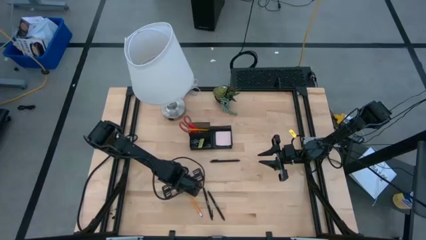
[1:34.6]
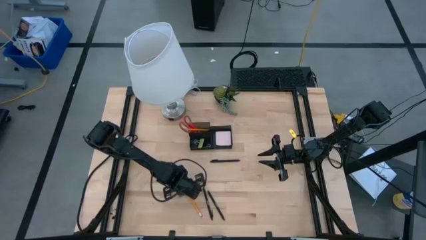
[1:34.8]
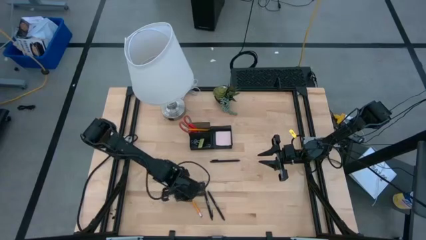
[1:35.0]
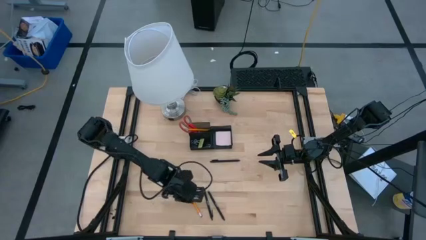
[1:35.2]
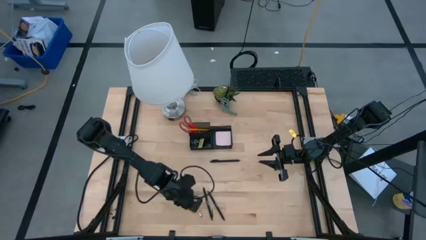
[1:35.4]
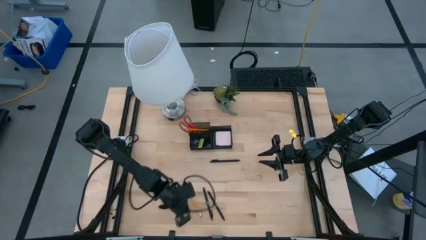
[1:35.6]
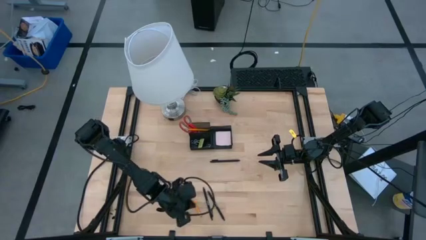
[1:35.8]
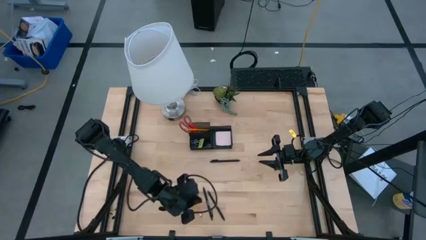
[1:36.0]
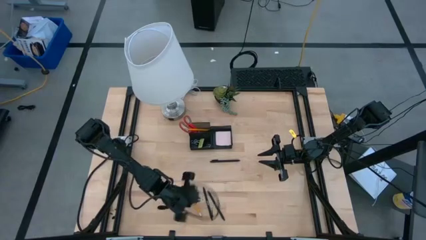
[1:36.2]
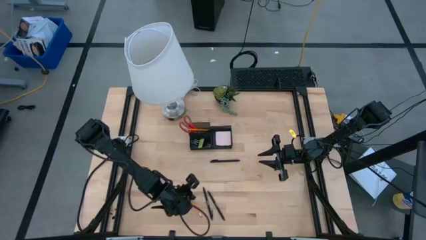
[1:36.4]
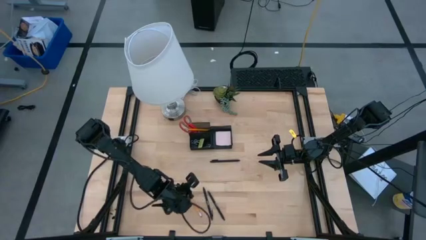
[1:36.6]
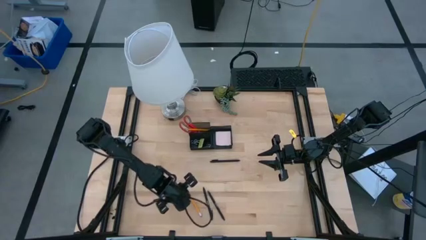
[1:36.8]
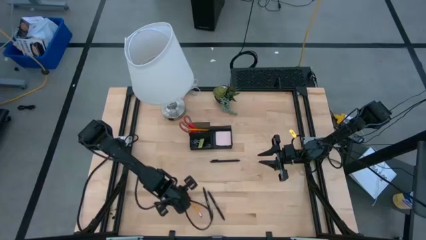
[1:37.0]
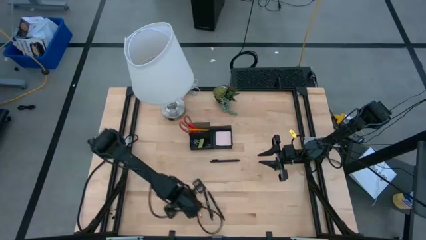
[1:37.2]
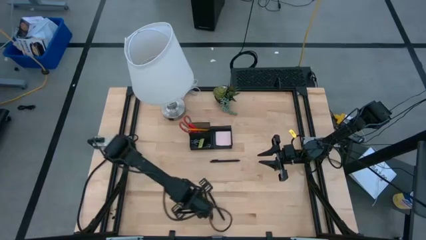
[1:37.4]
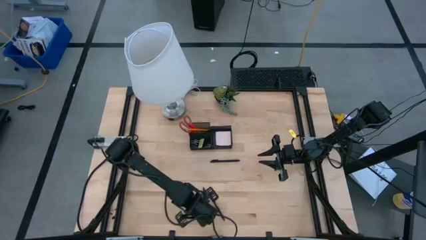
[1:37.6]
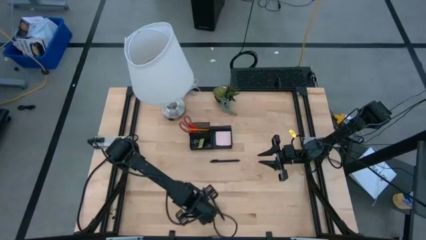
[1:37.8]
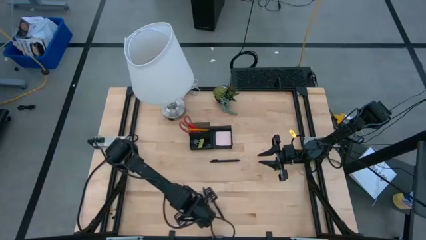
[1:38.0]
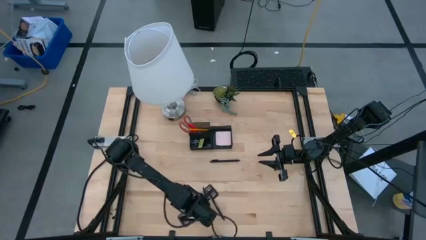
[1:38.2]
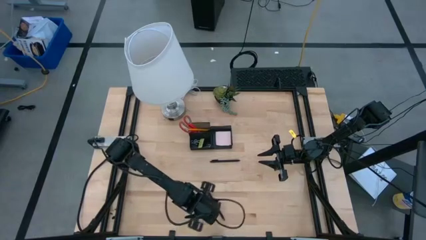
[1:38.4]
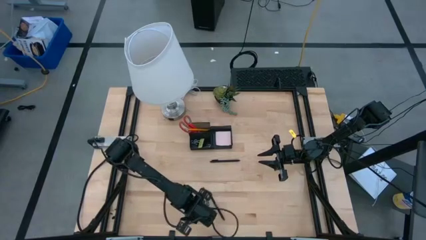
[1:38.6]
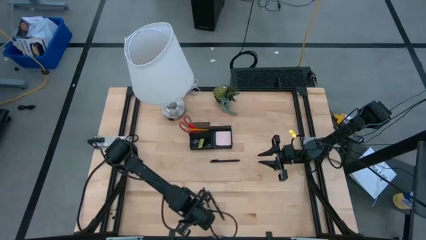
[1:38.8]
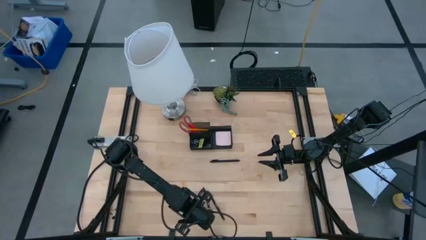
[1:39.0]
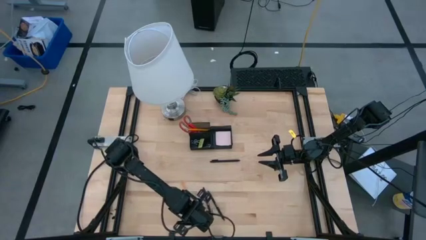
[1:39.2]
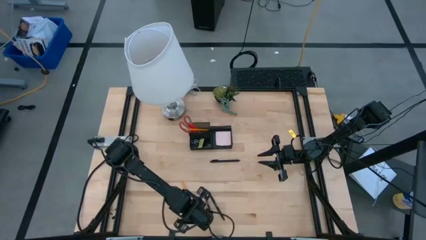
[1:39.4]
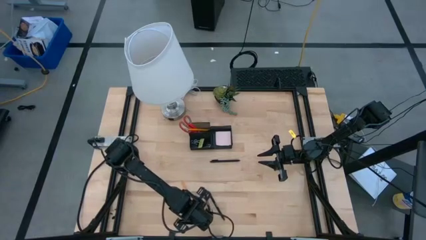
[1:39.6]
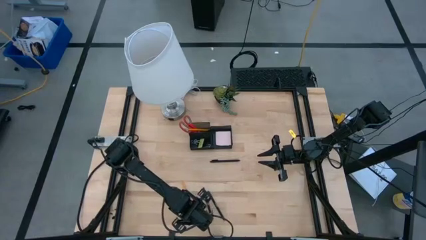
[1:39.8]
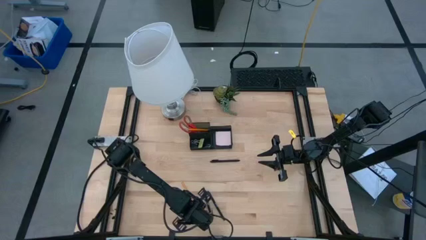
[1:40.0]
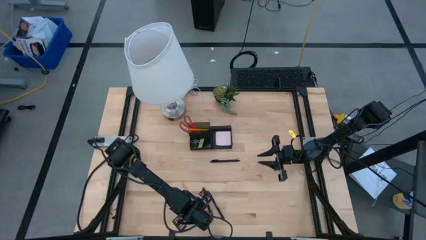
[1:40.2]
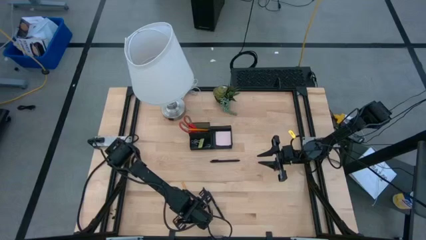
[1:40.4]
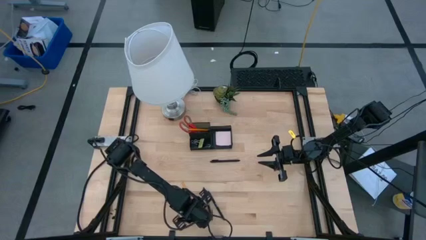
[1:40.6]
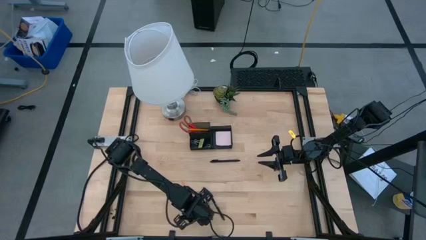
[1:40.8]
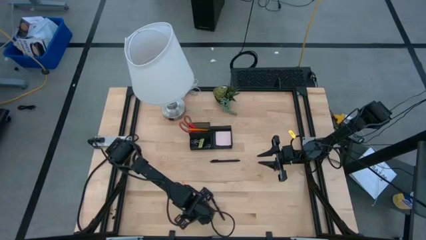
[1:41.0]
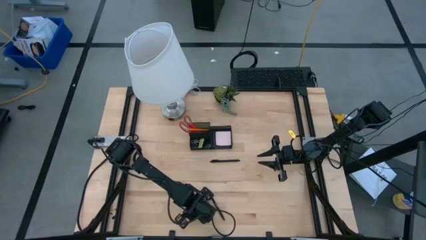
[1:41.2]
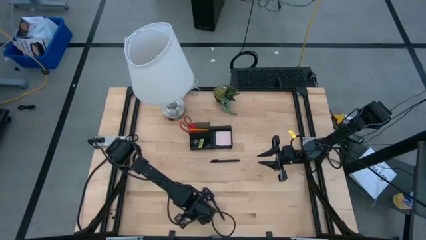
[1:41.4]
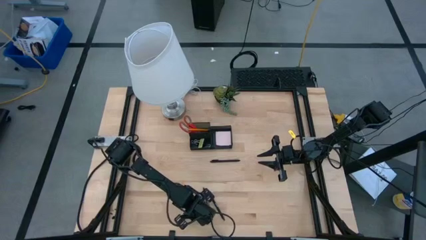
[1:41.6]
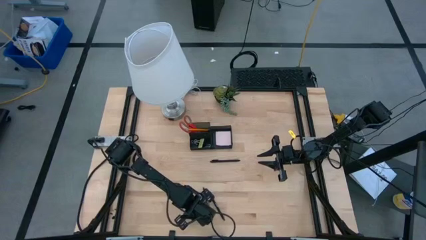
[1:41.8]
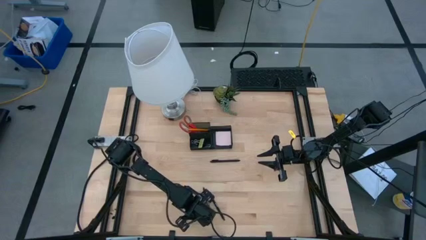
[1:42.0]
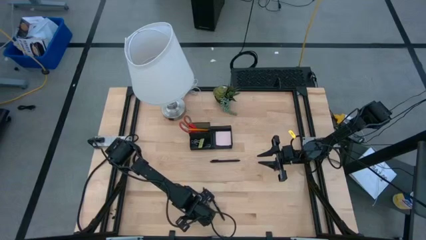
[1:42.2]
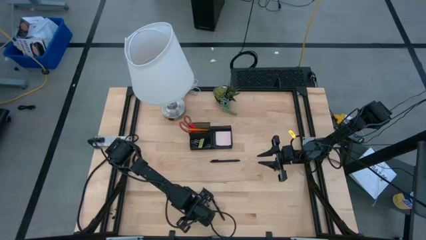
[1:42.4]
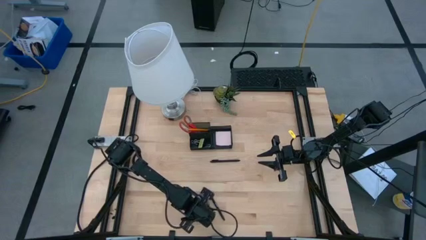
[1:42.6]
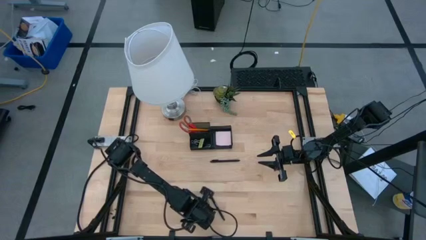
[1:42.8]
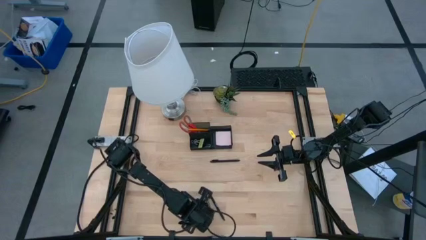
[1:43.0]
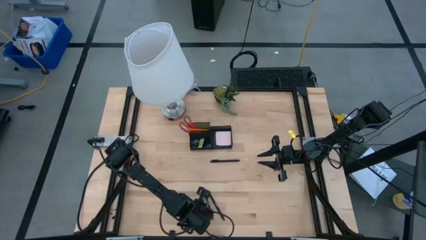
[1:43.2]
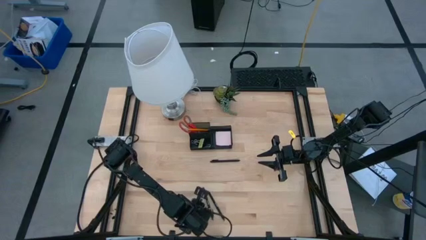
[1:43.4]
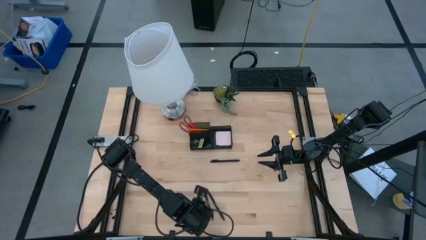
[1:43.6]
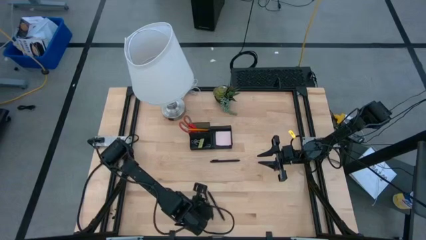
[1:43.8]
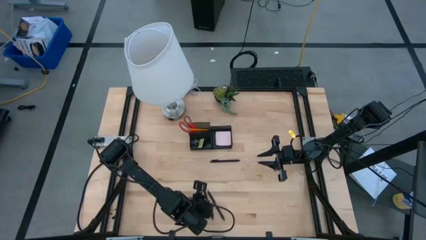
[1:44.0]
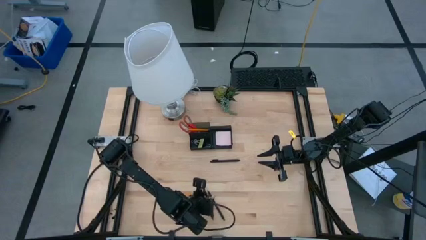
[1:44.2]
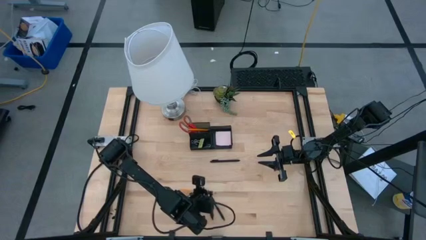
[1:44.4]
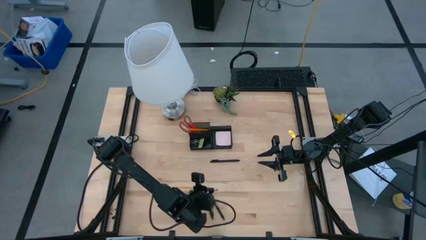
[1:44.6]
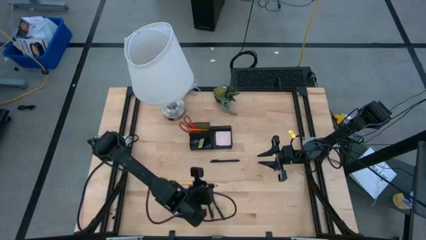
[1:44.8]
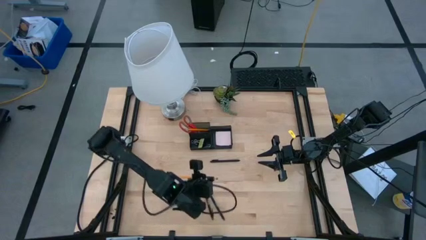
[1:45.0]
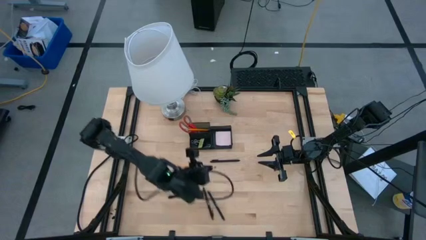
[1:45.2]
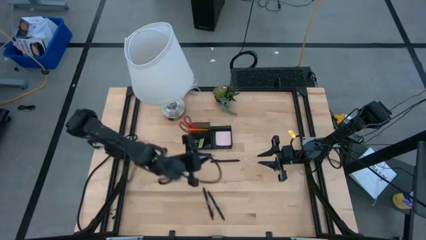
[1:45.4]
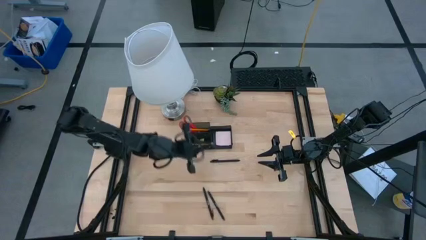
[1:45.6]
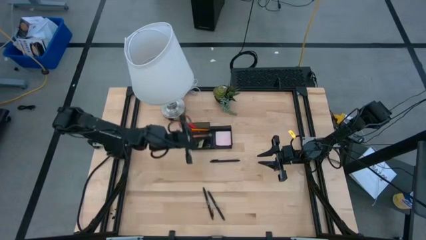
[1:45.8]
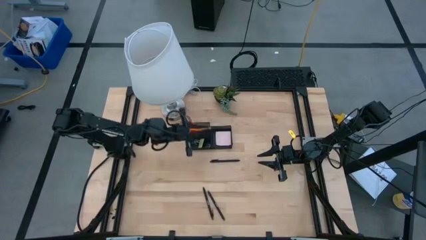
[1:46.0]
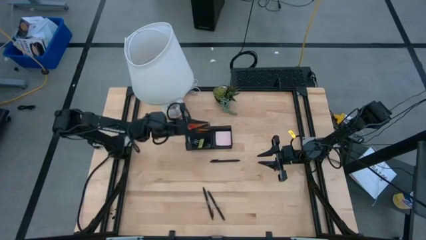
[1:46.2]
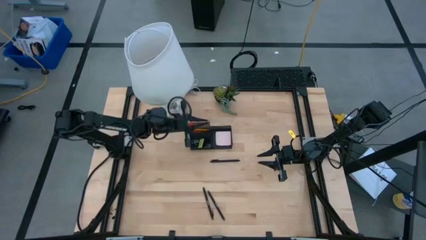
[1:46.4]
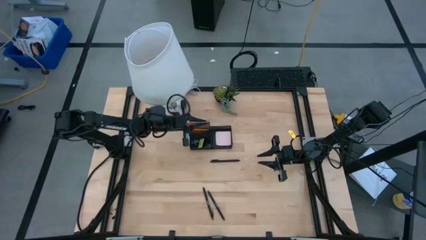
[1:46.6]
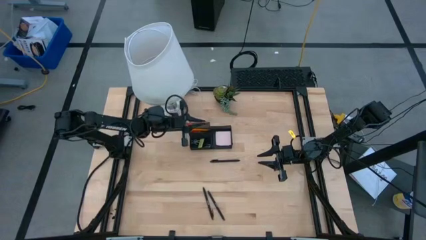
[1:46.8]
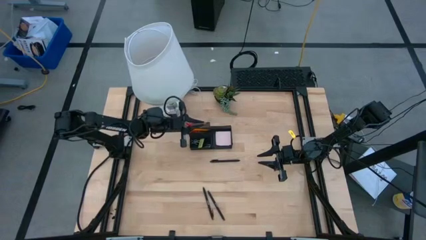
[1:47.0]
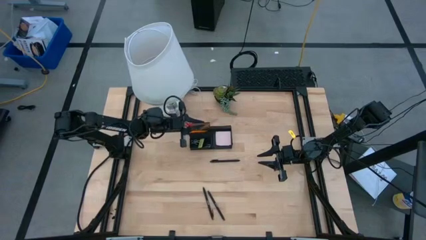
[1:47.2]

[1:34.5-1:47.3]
Task: Pick and place office supplies into organizer
Put the pencil into the black desk organizer
